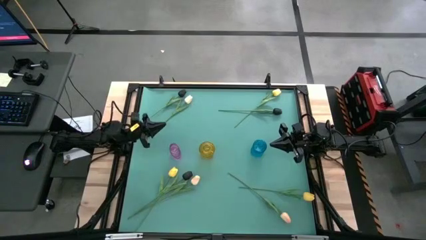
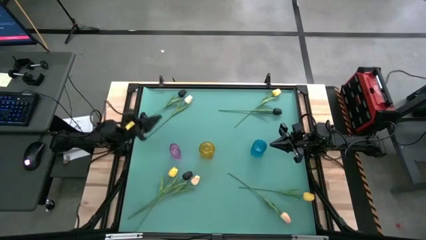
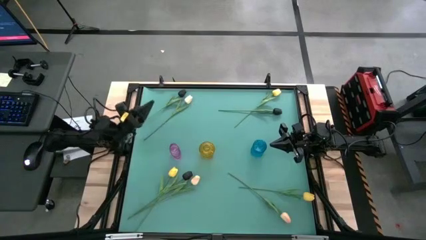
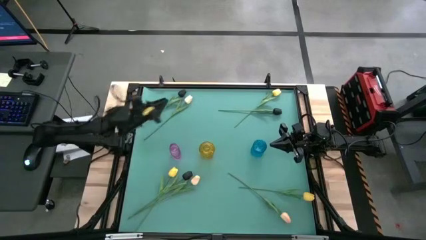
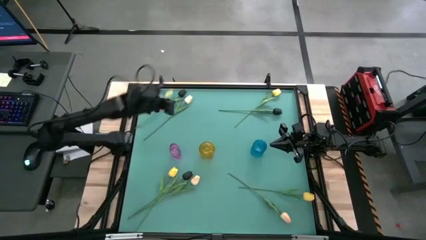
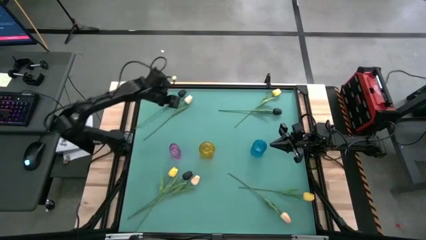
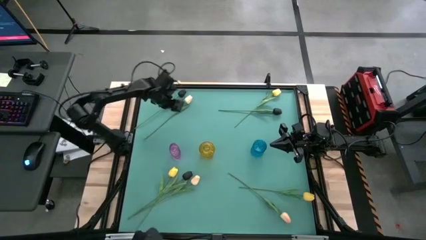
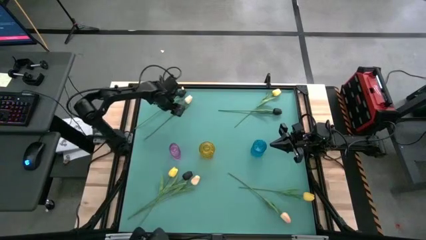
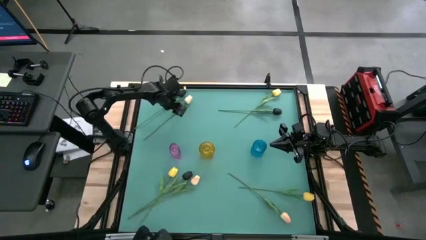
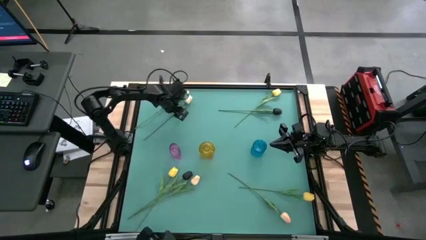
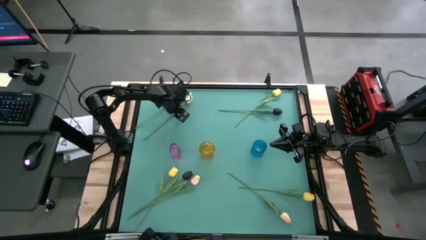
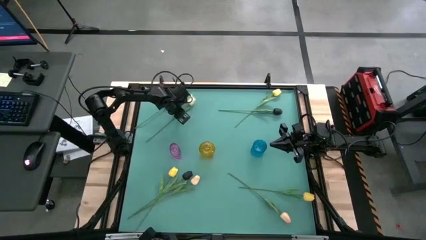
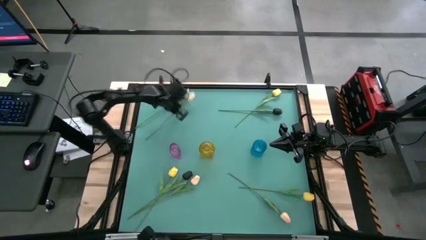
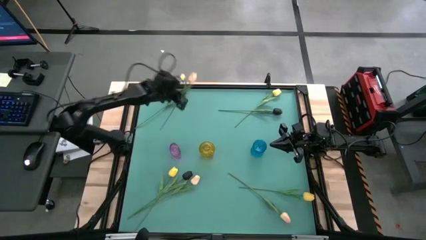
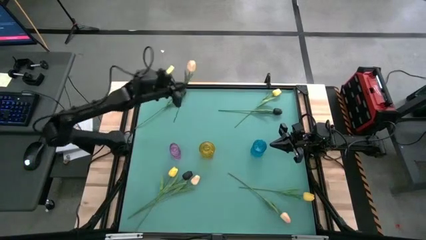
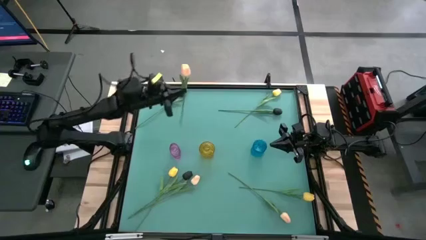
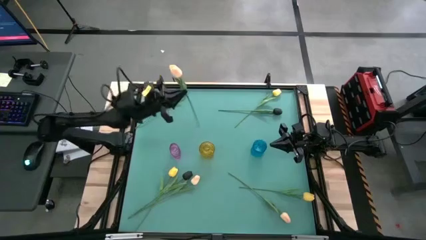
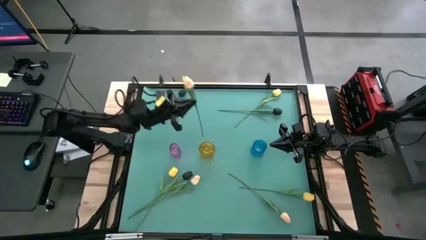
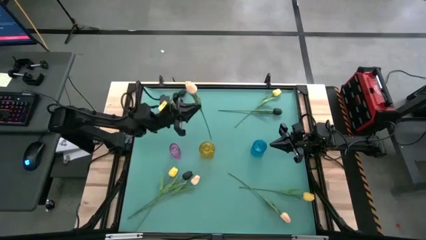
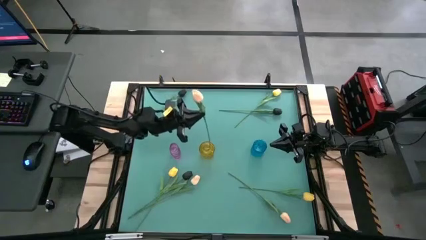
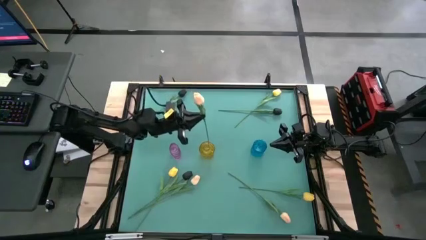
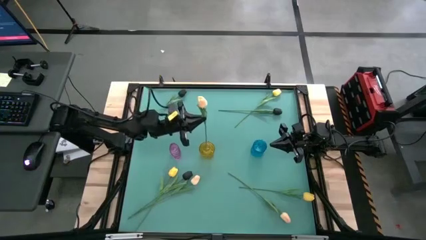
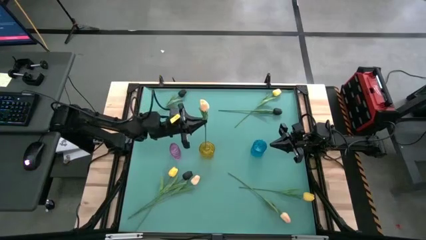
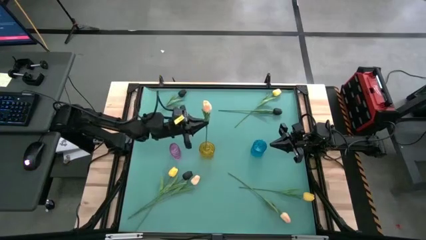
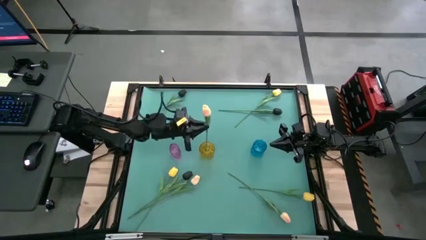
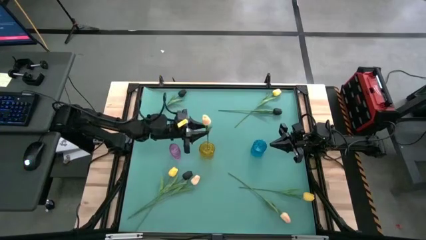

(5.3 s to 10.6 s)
Task: Sort flowers into vase by color
Put the top left white flower into the yellow vase

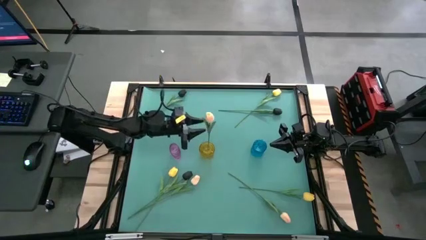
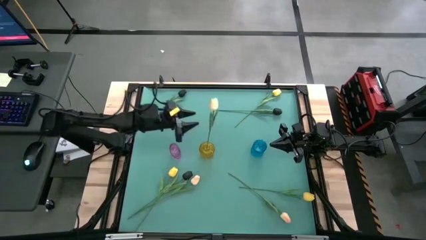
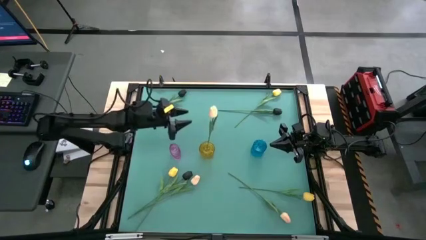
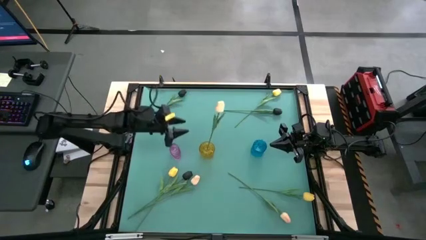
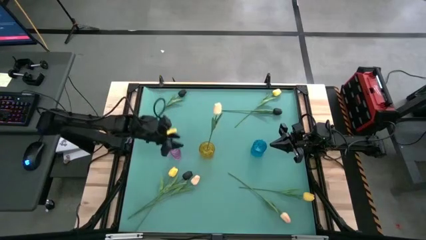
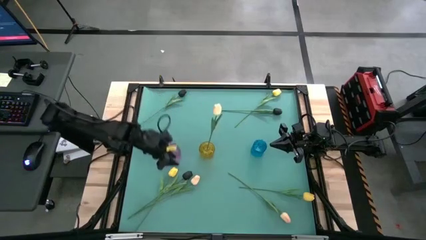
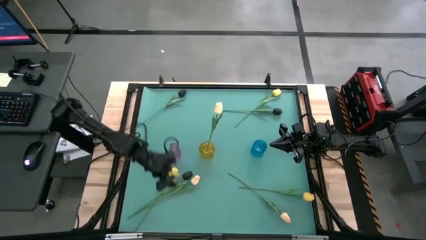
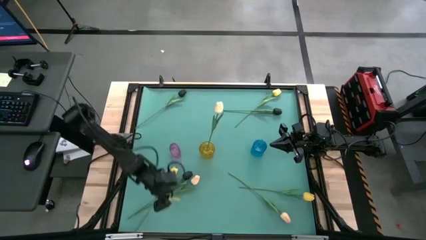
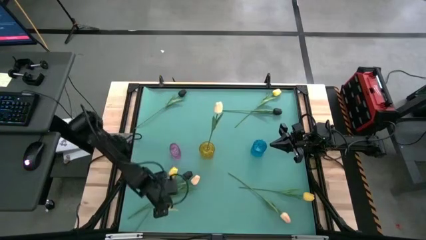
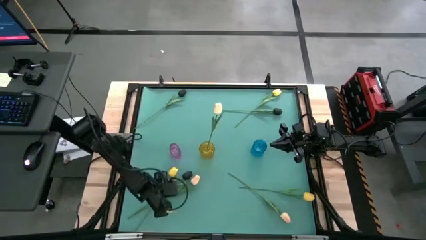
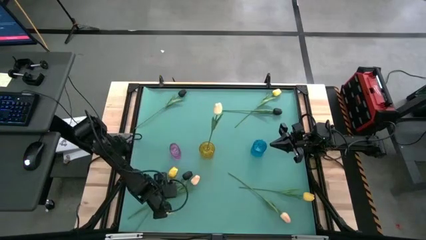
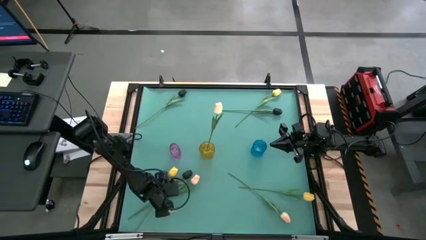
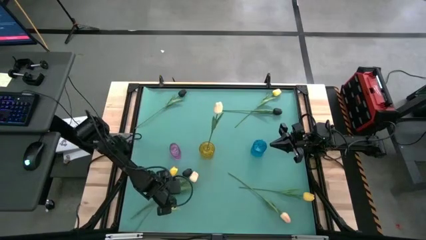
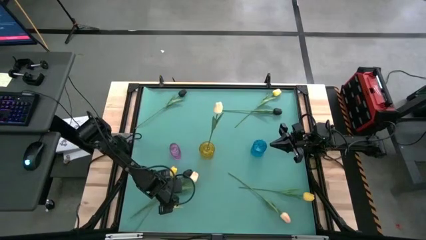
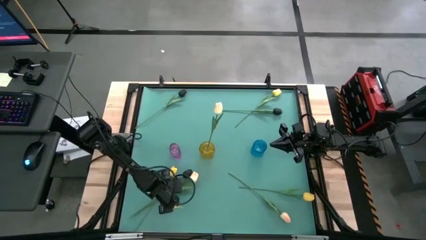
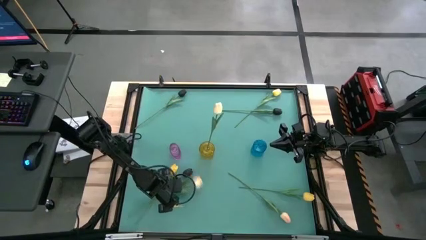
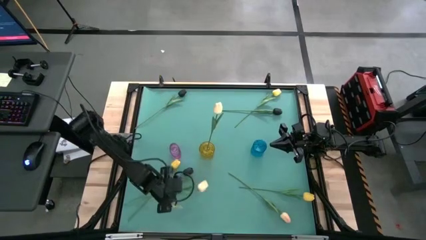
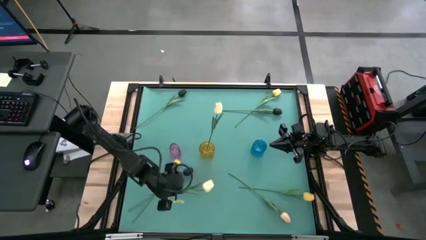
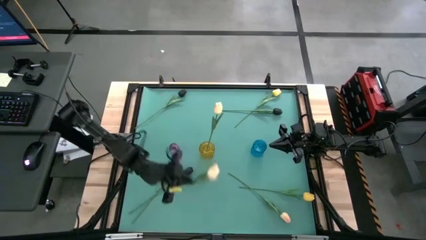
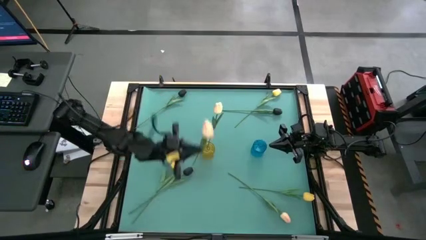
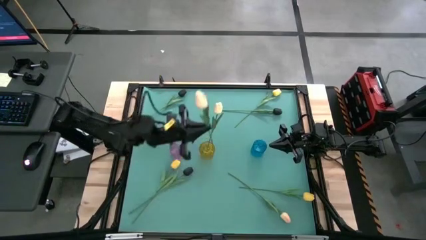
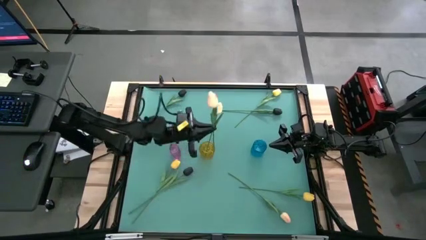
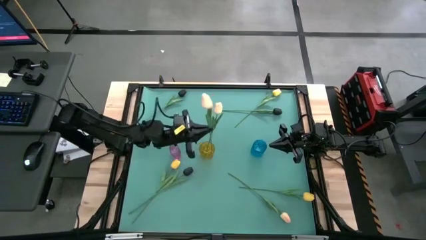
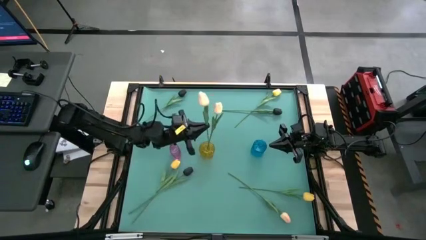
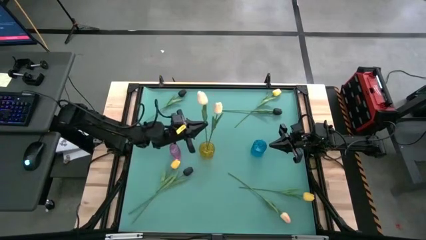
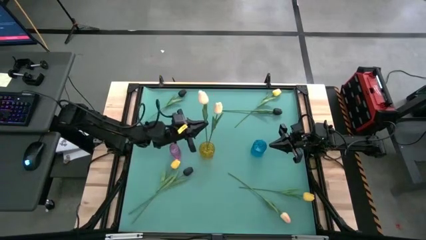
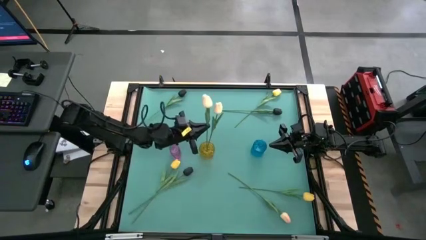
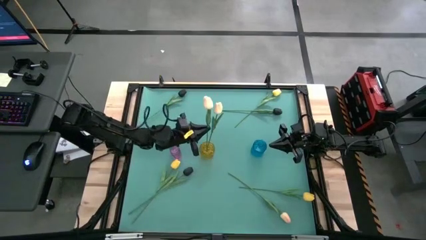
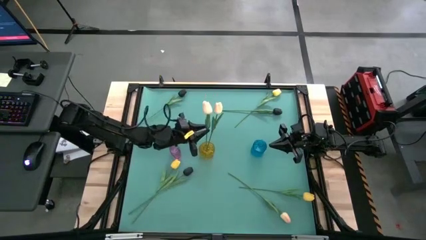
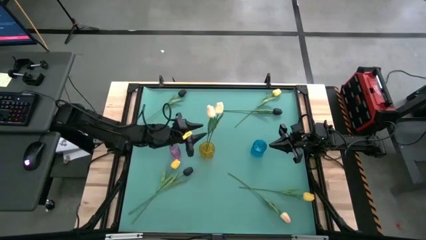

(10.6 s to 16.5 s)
Put the left white flower into the yellow vase

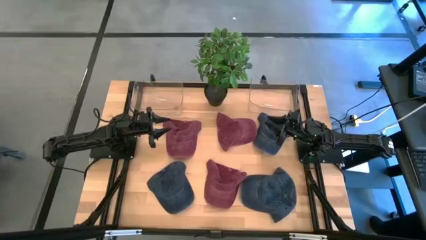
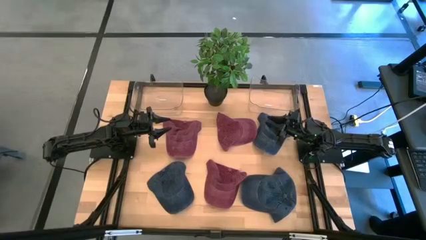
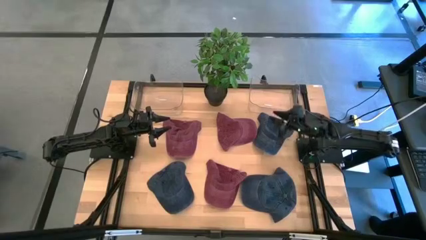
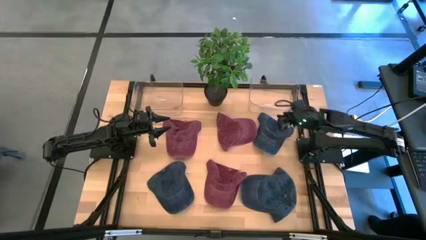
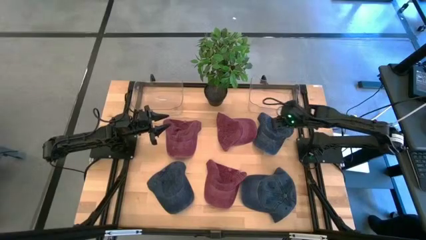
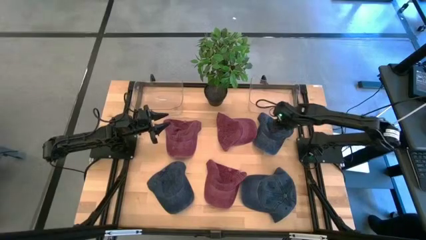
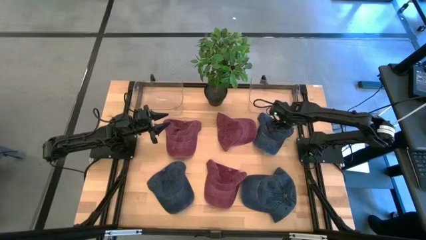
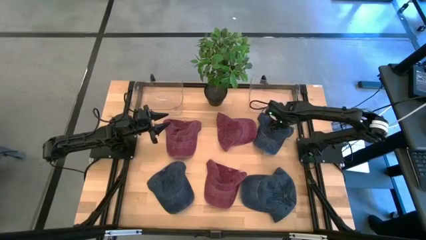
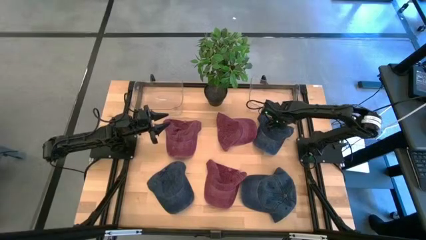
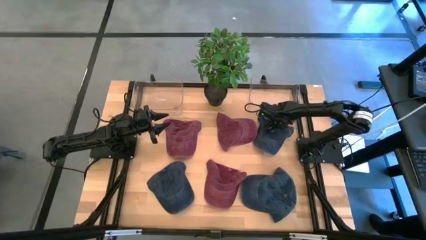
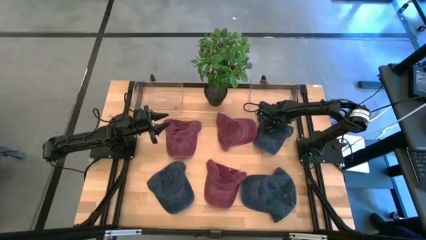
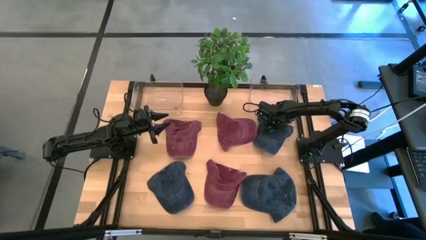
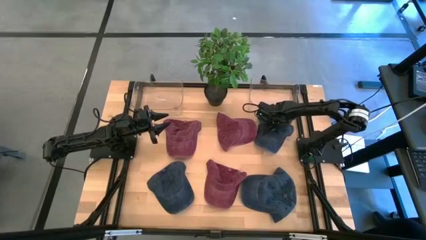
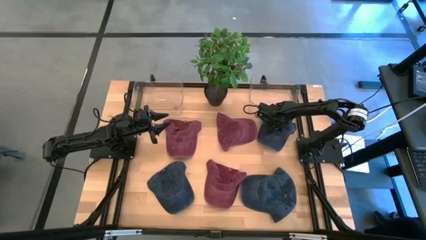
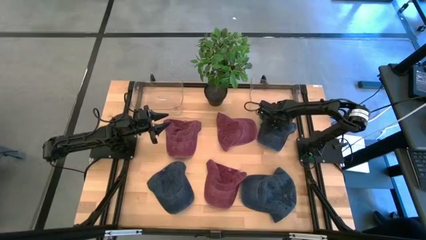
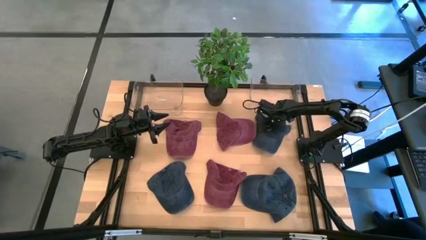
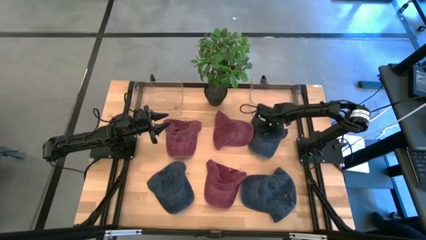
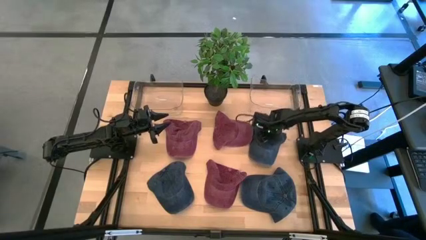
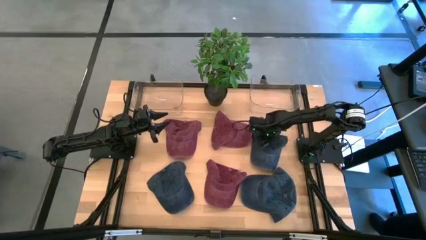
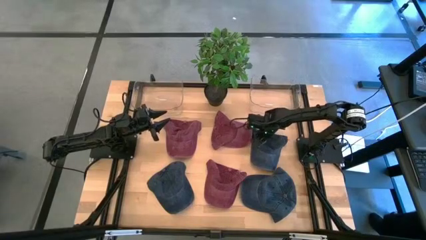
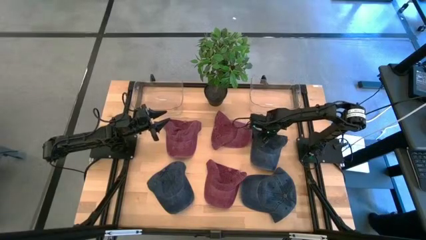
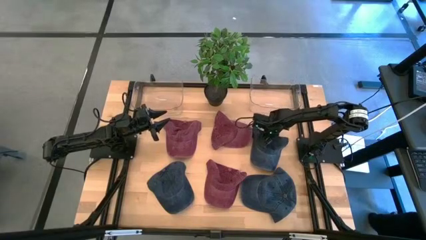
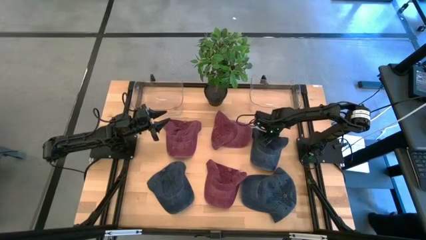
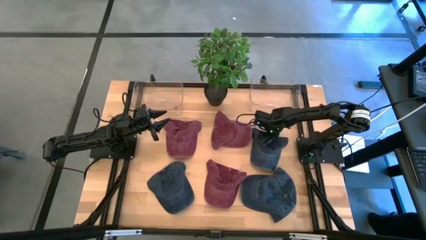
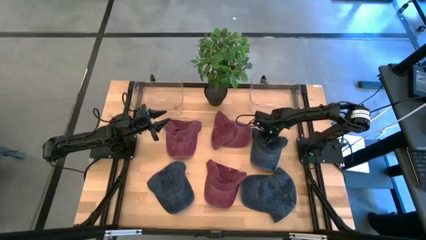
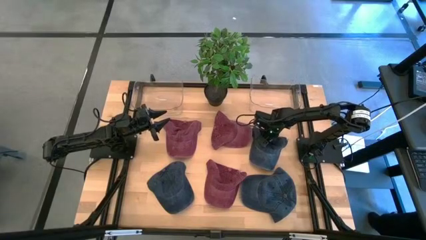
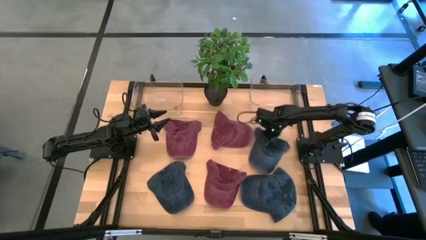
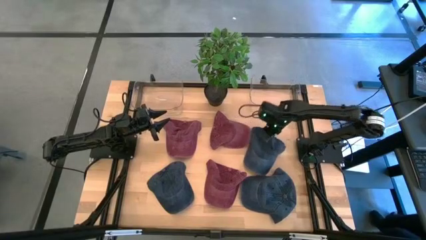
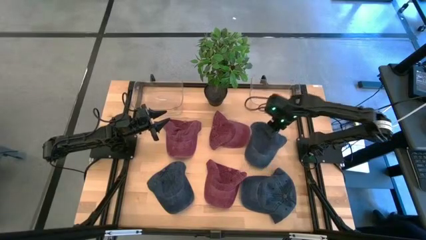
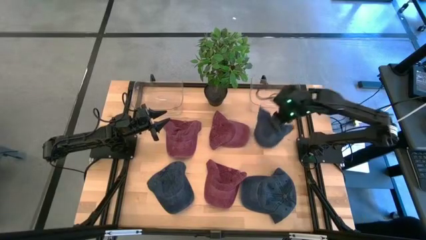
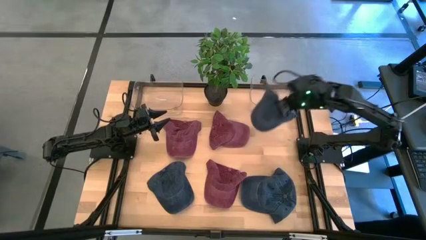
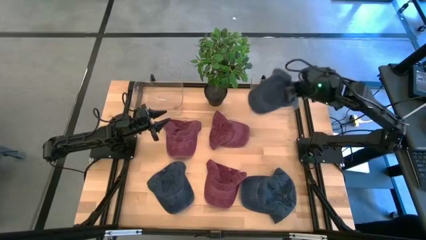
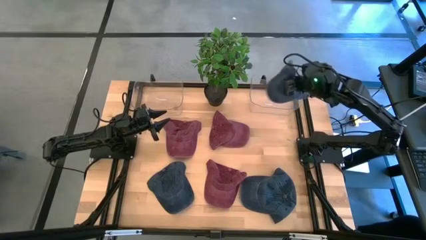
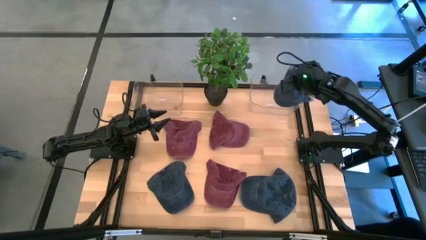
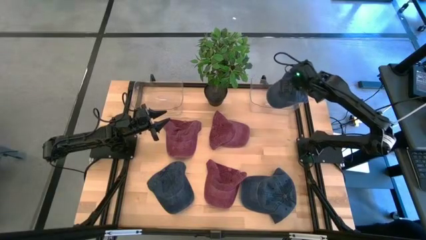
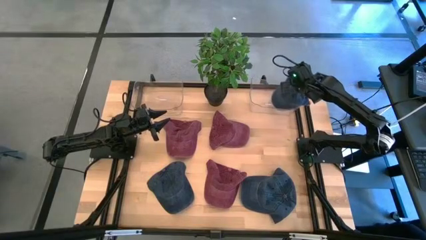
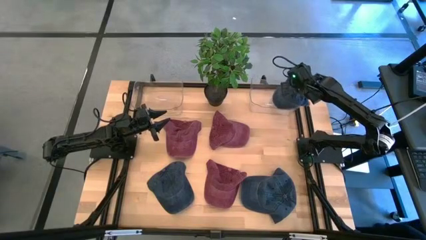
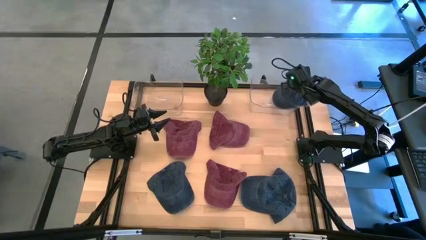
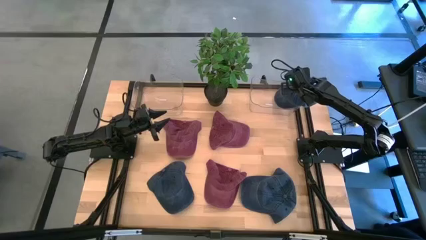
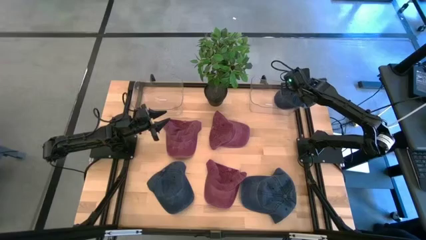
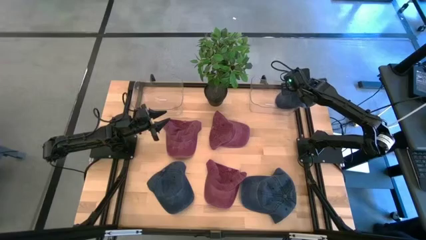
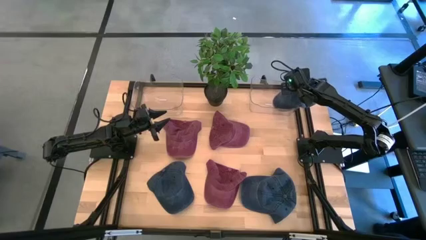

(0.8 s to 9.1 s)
Task: Pick & Place hat
Put the top black cap into the right transparent bin
